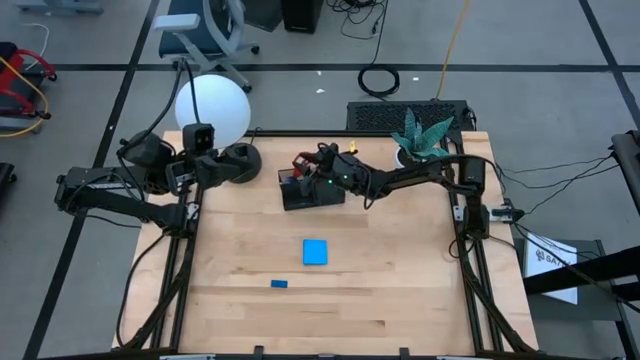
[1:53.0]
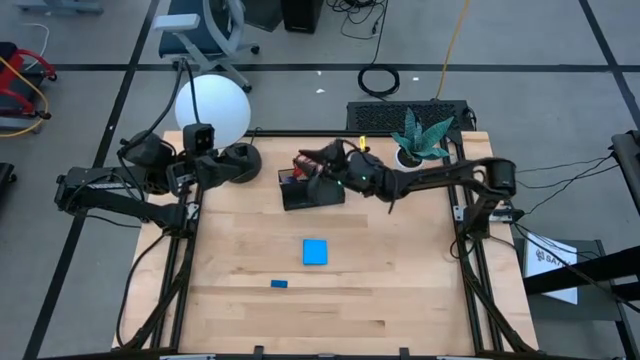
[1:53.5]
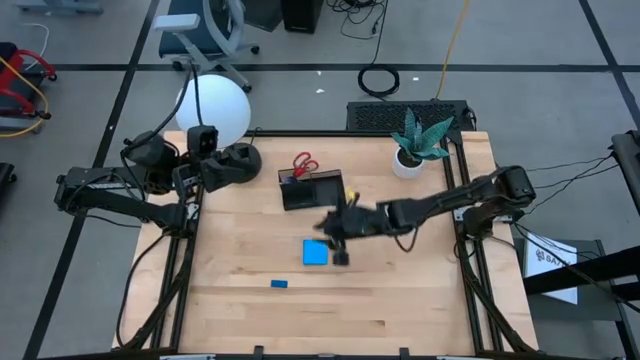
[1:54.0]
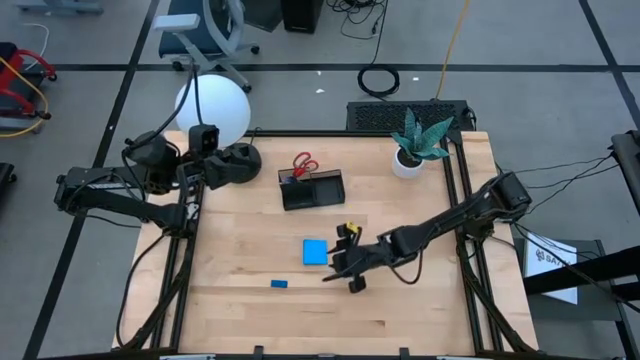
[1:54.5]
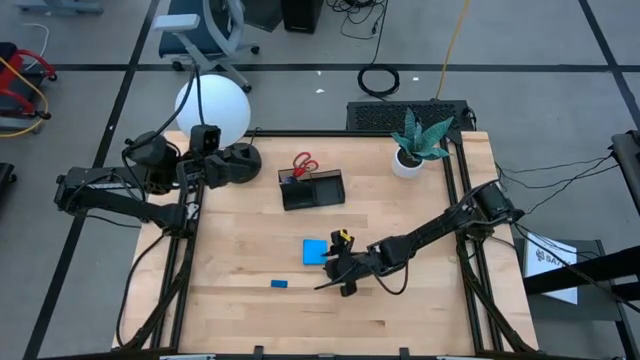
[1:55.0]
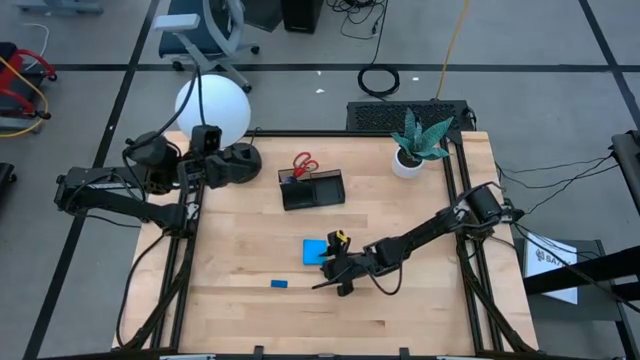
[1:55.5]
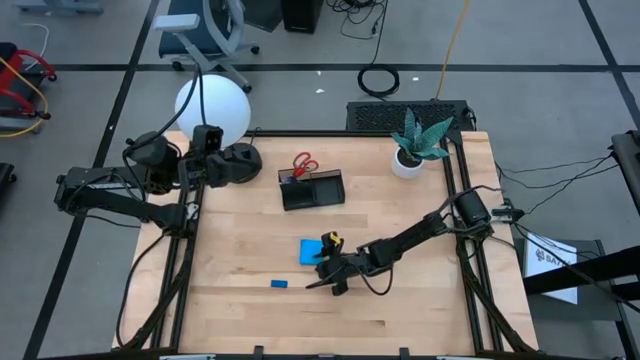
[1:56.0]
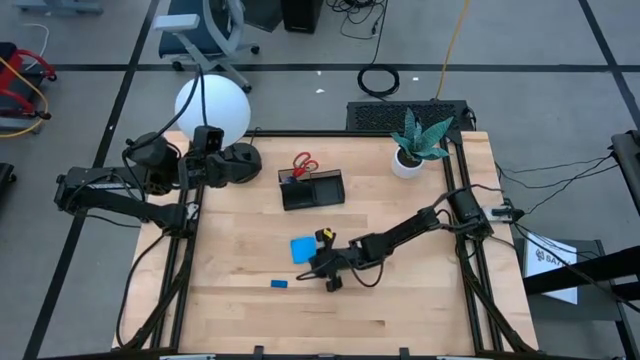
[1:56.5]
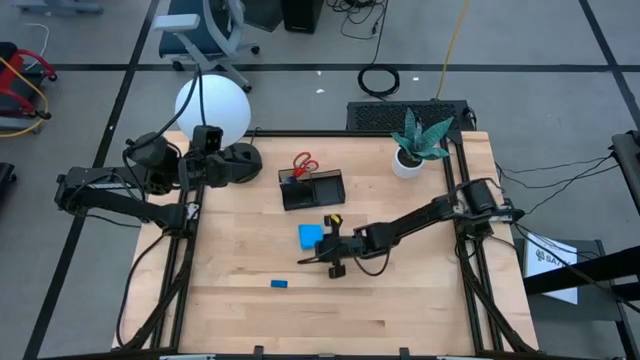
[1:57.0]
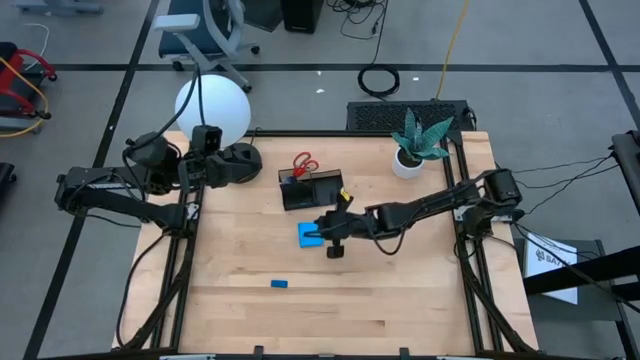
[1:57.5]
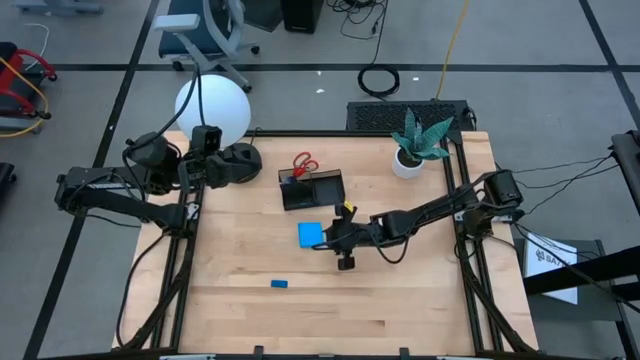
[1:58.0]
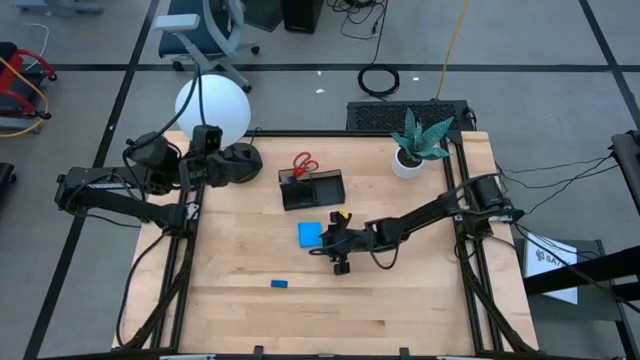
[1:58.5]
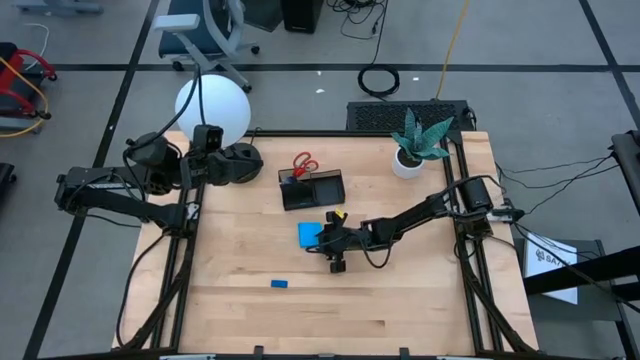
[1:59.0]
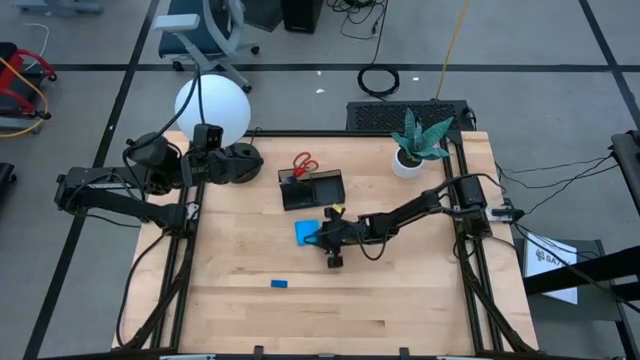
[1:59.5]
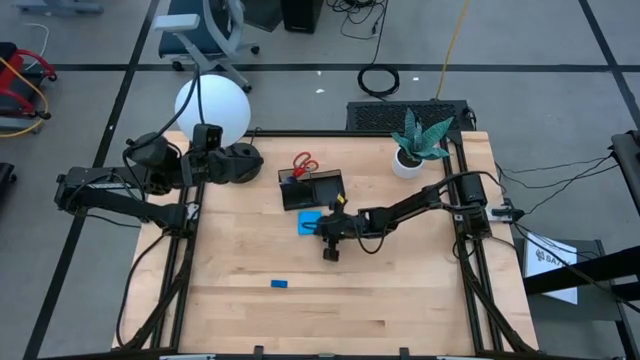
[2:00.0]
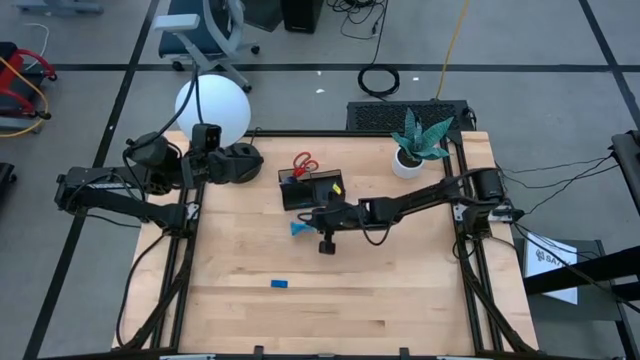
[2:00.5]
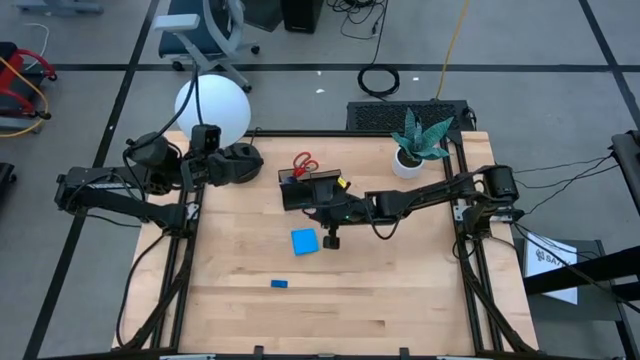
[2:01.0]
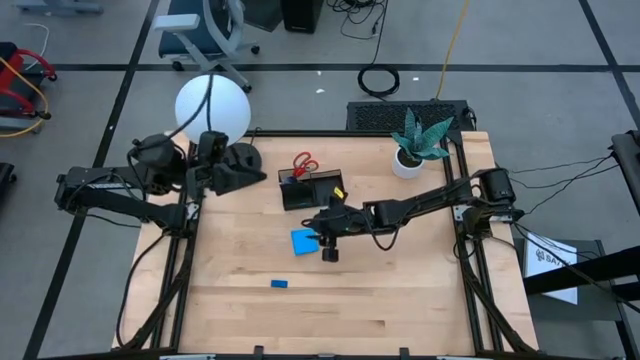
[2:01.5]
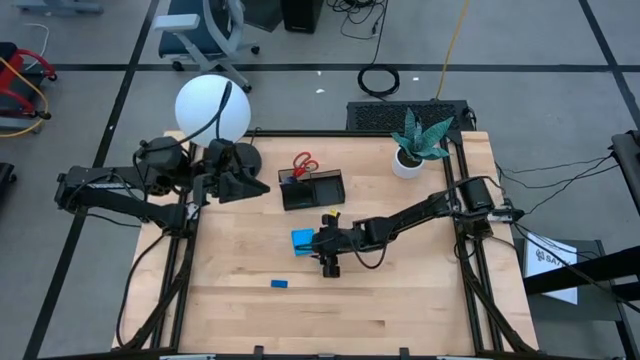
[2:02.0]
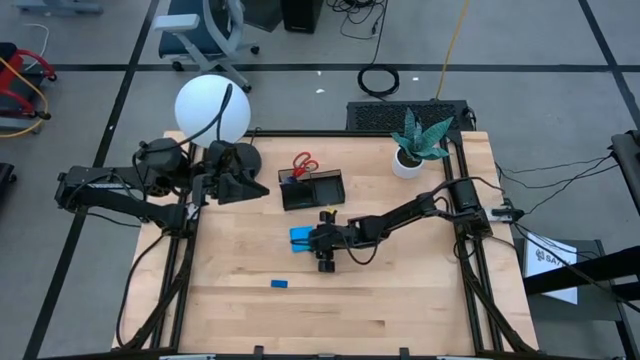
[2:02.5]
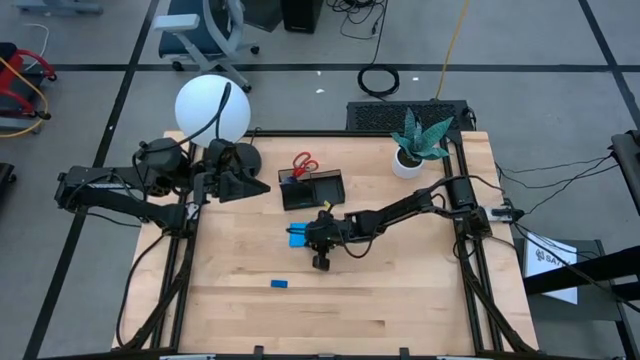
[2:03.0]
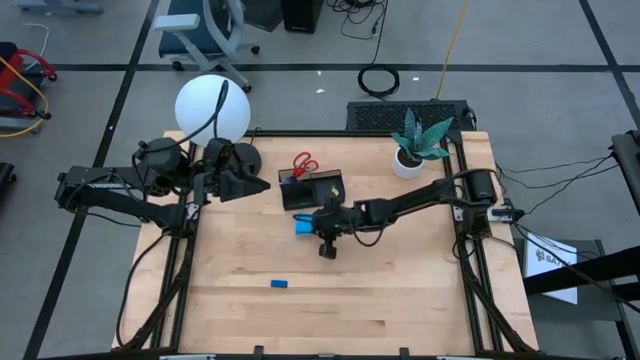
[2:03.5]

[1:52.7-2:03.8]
Task: Pick and place office supplies into organizer
Put the blue sticky notes into the desk organizer

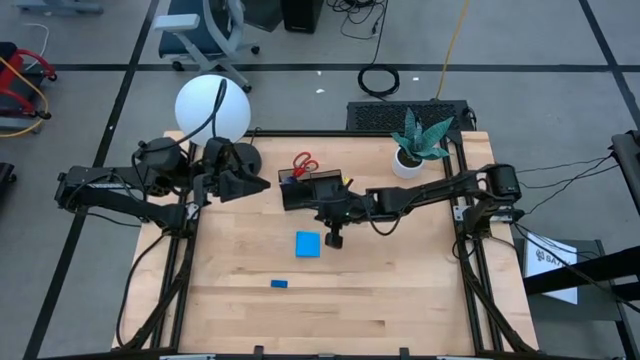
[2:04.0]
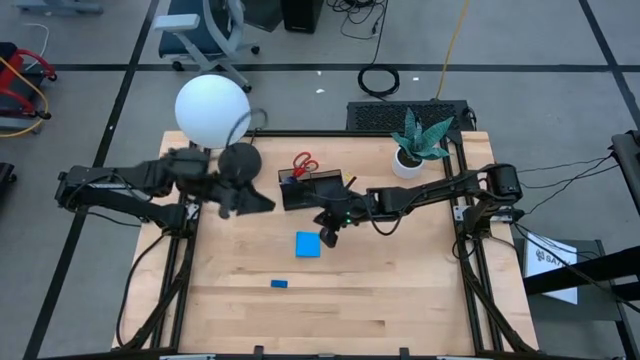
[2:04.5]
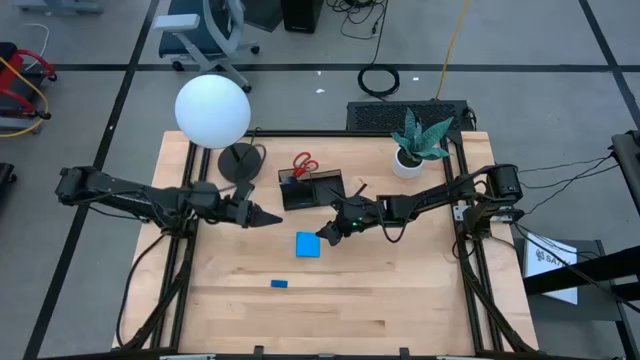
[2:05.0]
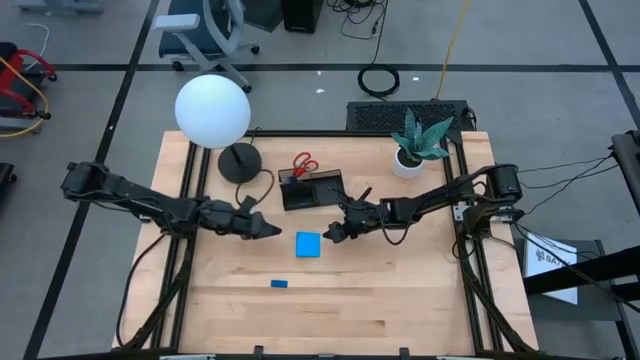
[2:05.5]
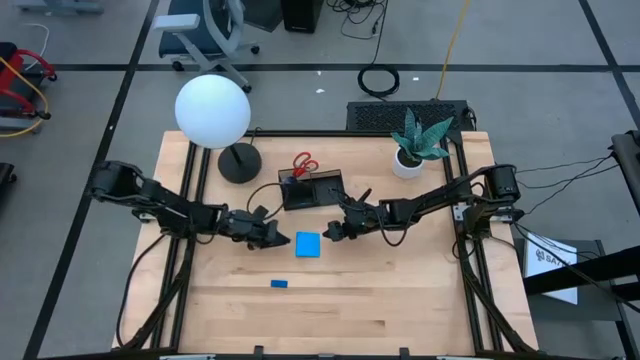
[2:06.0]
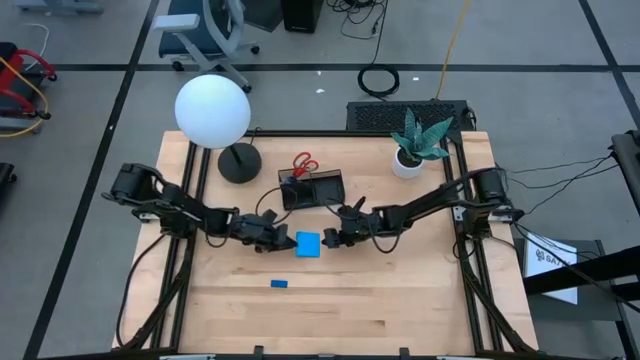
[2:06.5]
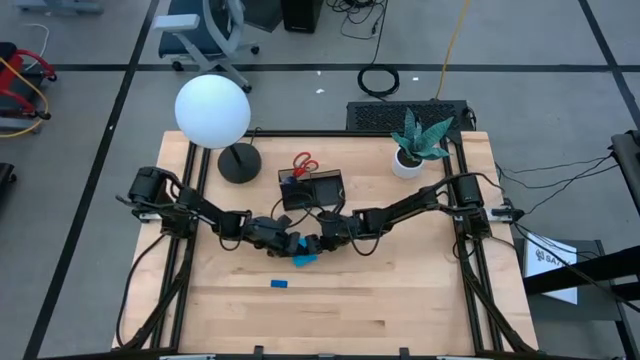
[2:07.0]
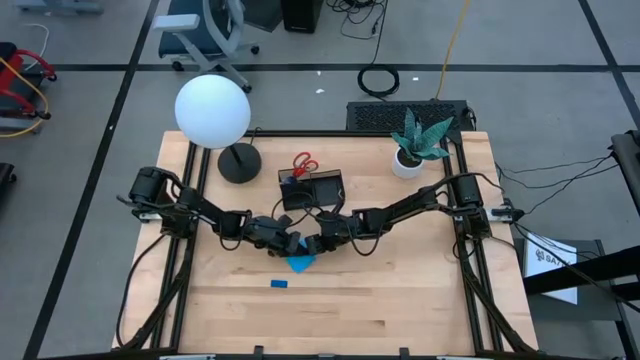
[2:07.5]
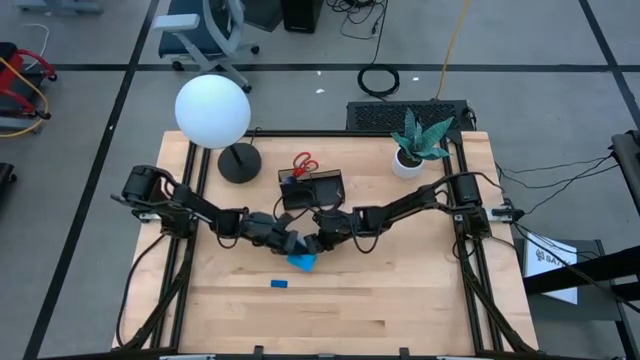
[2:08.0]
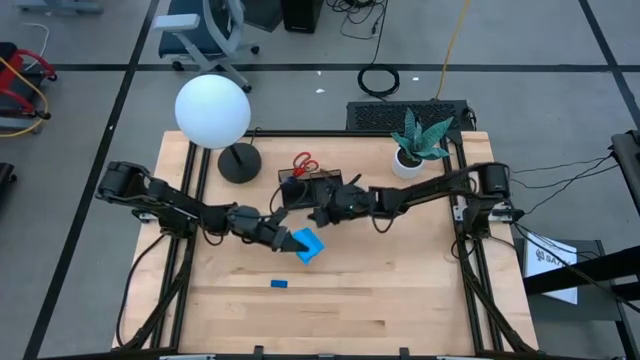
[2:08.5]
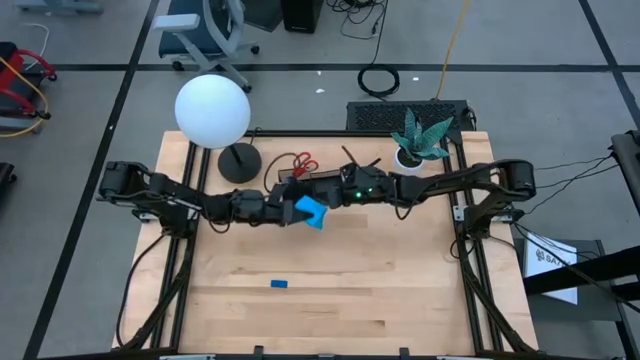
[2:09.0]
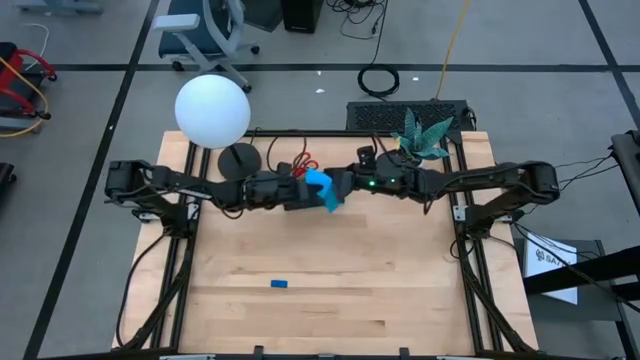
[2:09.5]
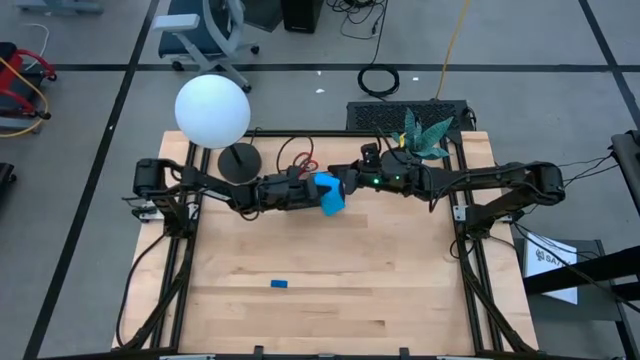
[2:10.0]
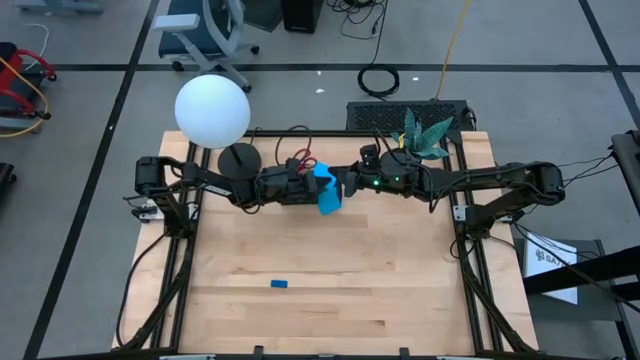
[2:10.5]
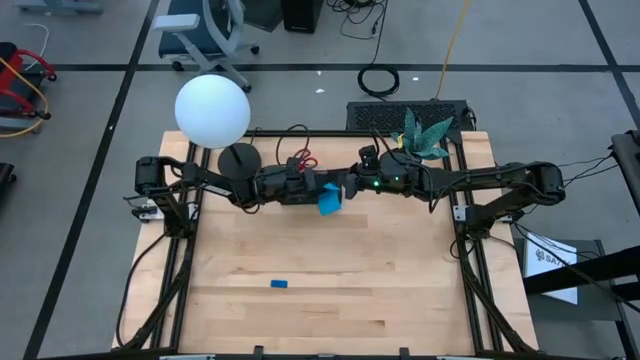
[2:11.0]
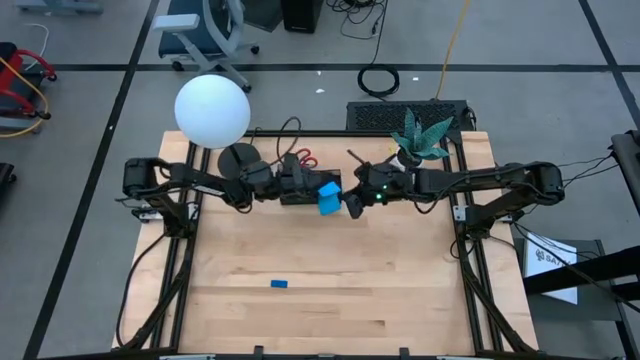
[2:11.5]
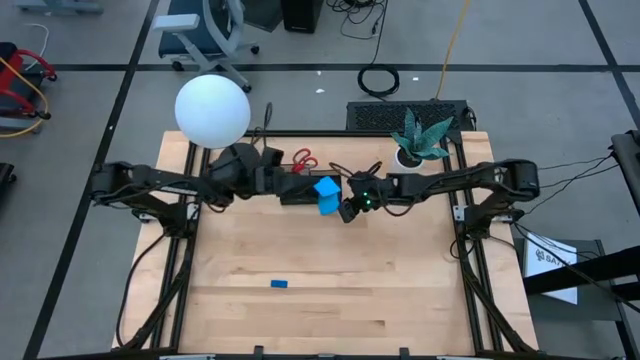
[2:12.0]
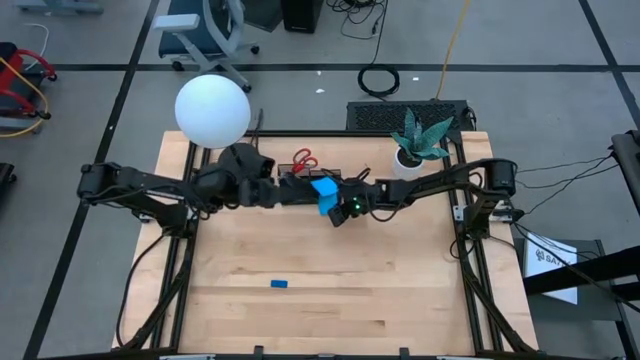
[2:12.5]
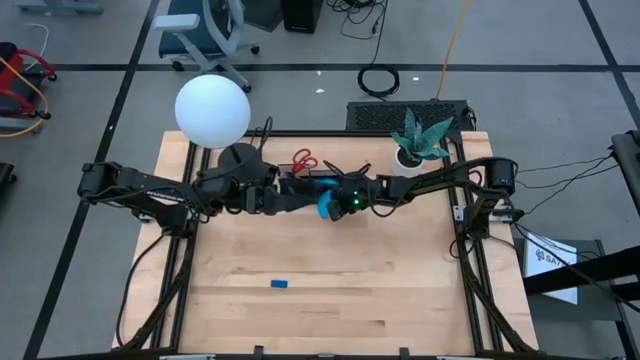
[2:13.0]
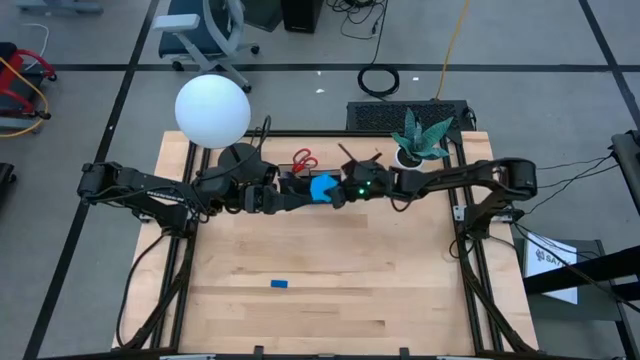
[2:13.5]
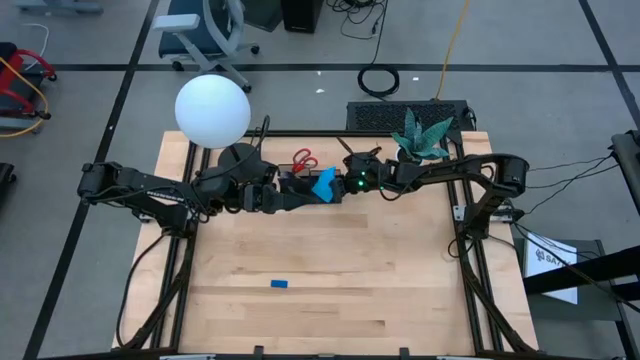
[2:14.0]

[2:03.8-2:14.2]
Put the blue sticky notes into the desk organizer
